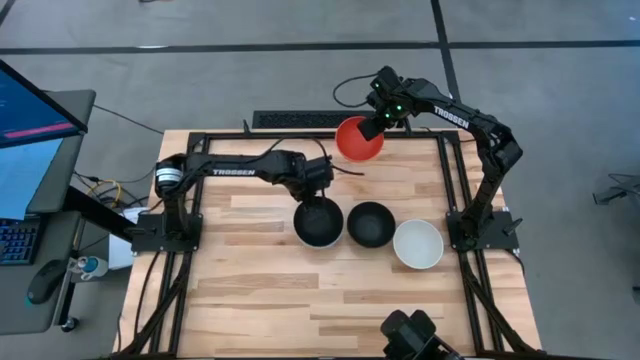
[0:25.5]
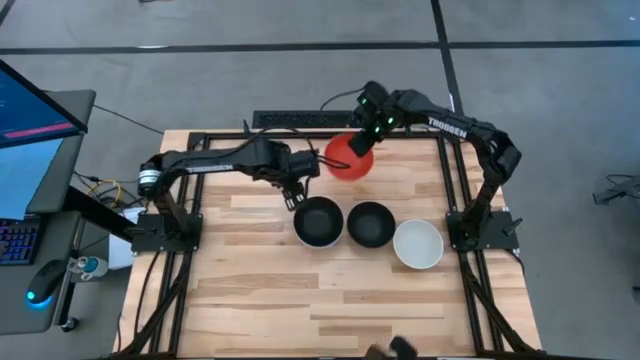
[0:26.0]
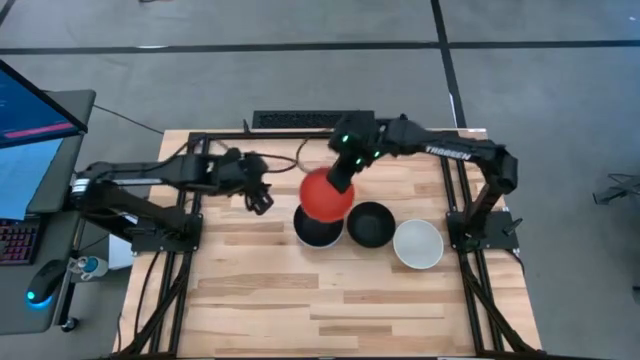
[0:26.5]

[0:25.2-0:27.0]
Task: Nest bowls inside each other
Stack the orange bowl on top of the black stacked bowl

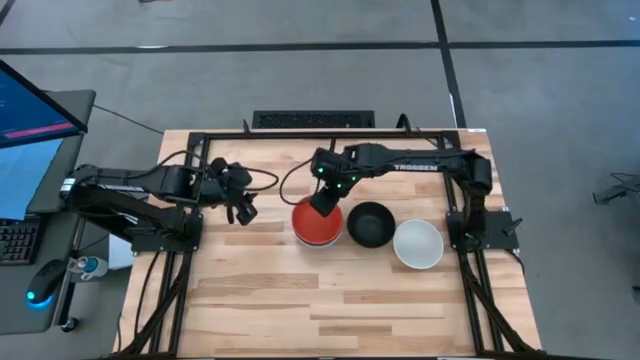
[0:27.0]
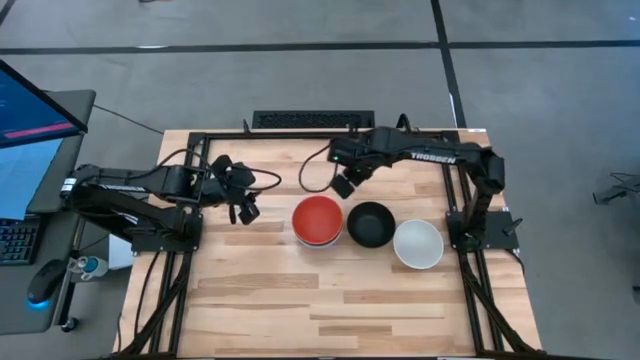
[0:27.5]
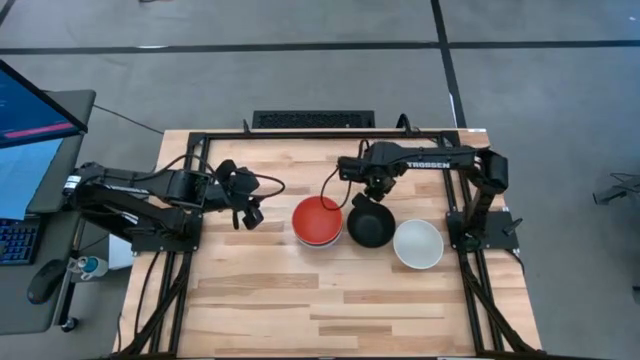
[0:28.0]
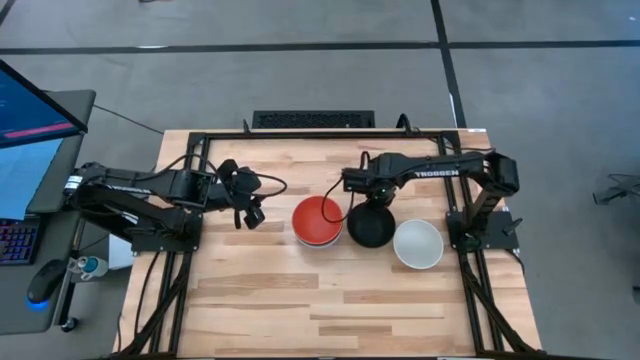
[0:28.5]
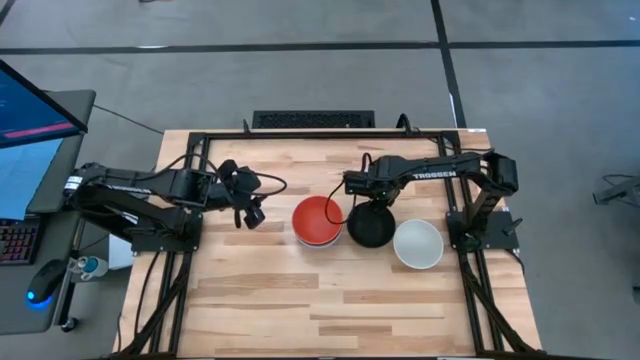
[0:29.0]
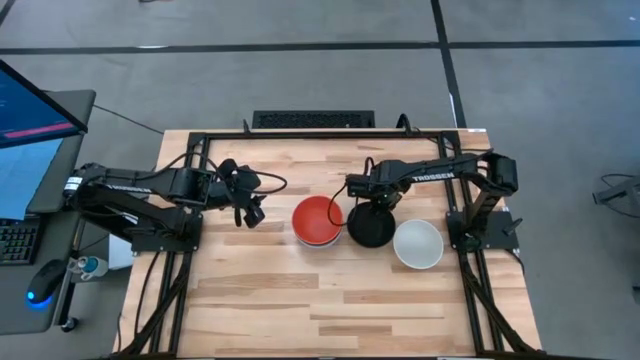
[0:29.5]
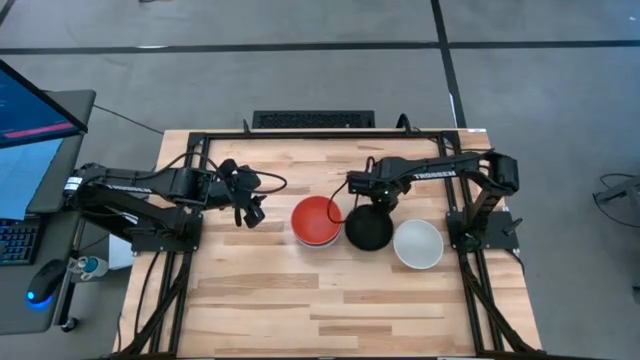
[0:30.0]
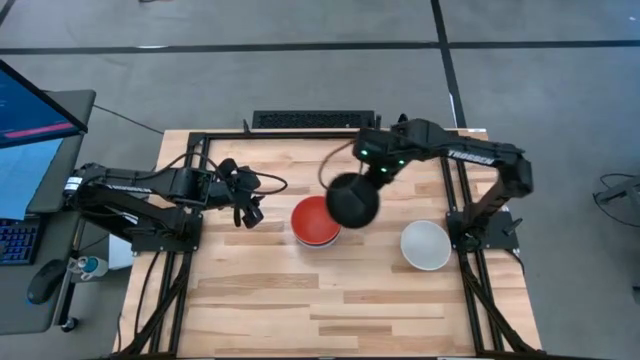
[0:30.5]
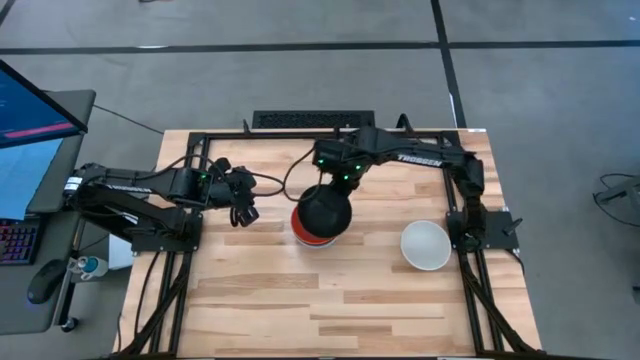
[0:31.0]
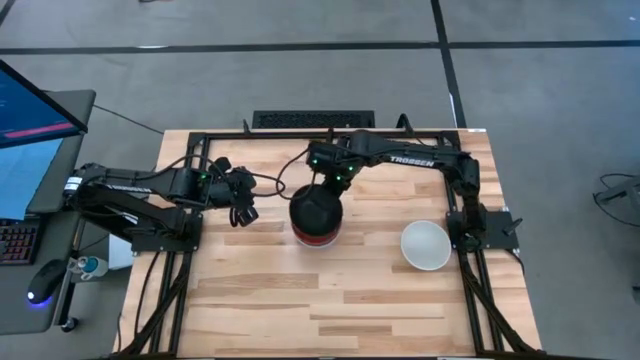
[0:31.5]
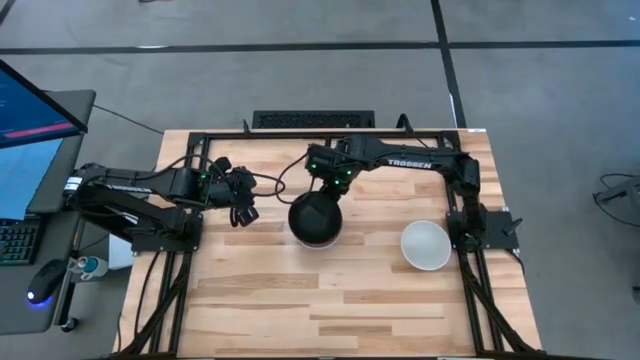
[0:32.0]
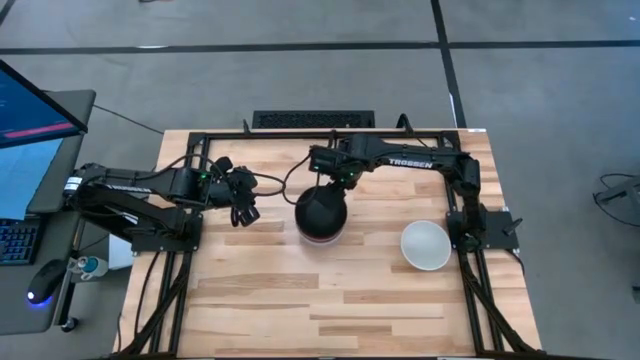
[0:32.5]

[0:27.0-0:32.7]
Stack the black bowl on top of the orange stacked bowl

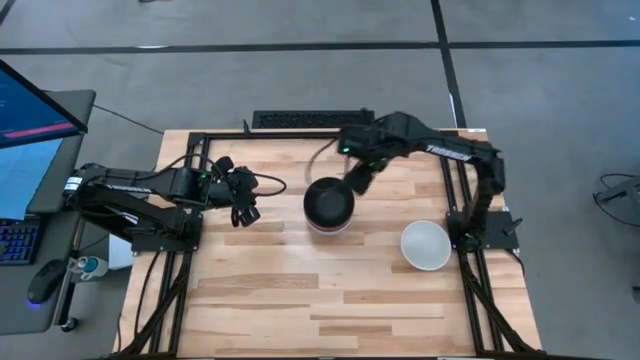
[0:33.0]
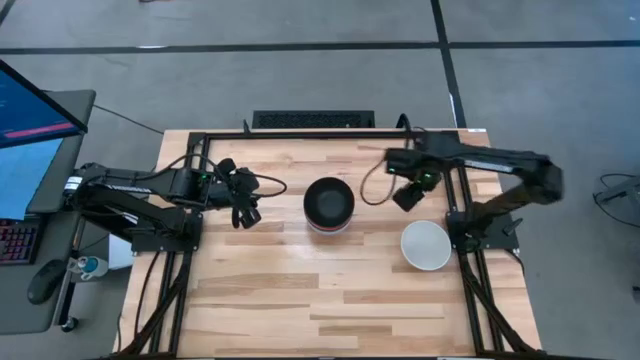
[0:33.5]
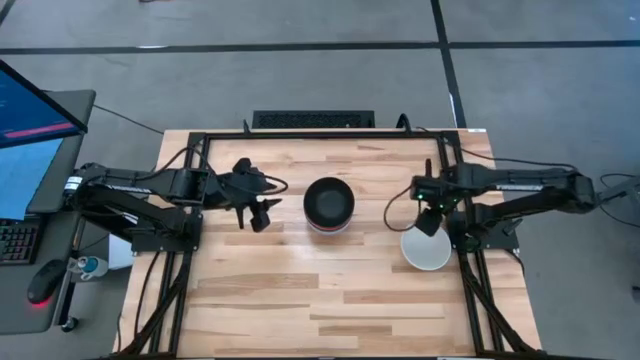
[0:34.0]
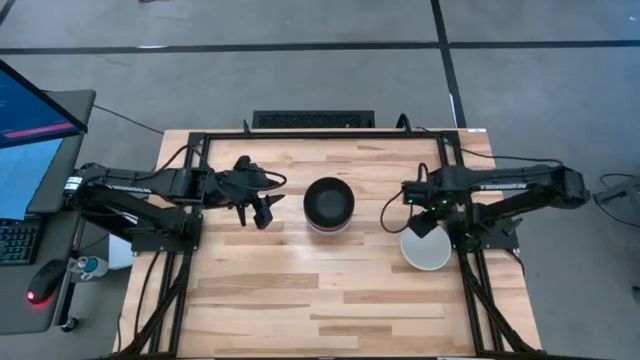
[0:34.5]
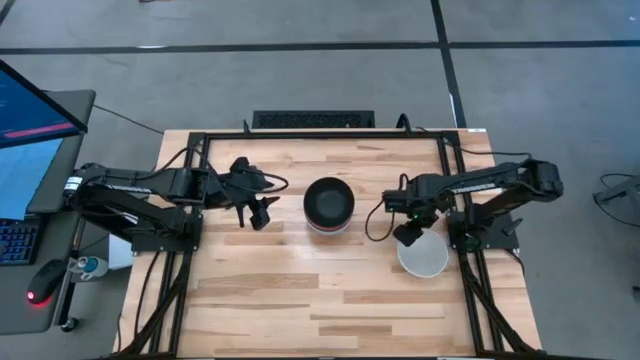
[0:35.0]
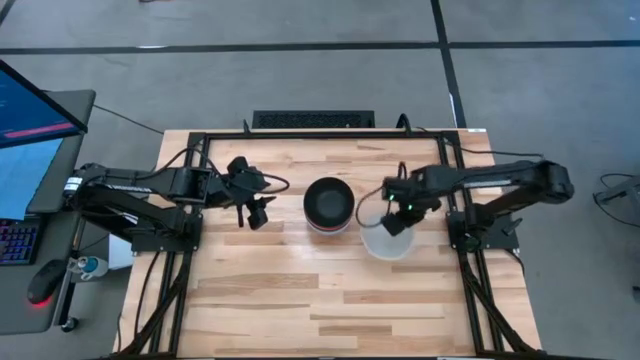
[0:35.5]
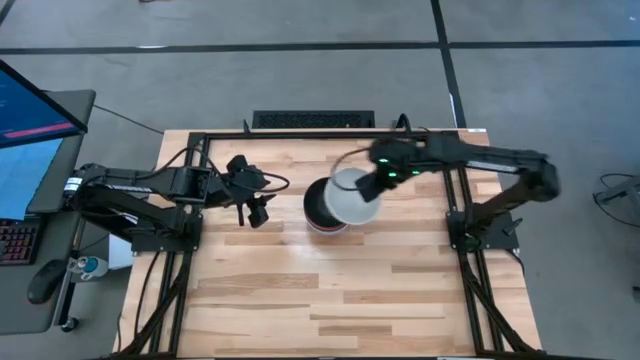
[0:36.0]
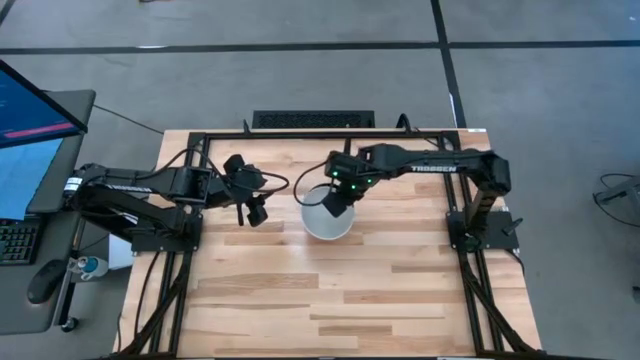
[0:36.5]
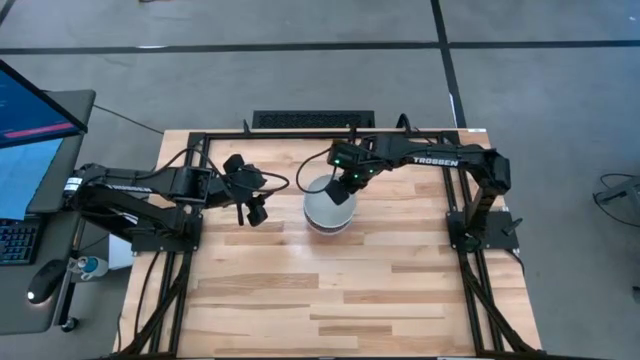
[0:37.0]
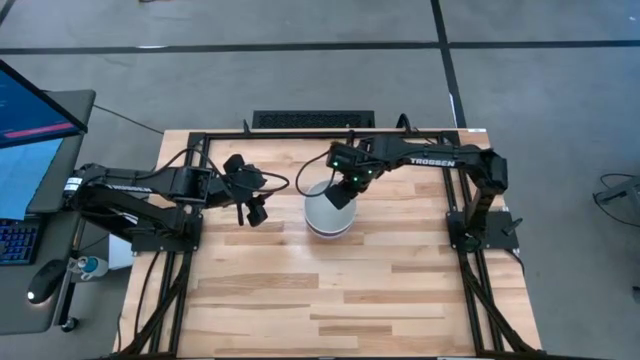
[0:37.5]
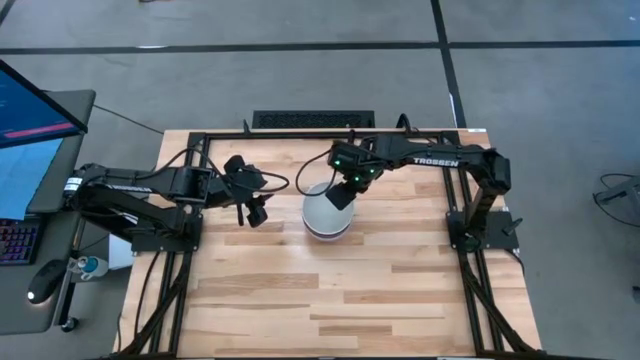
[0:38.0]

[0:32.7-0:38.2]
Stack the white bowl on top of the black stacked bowl

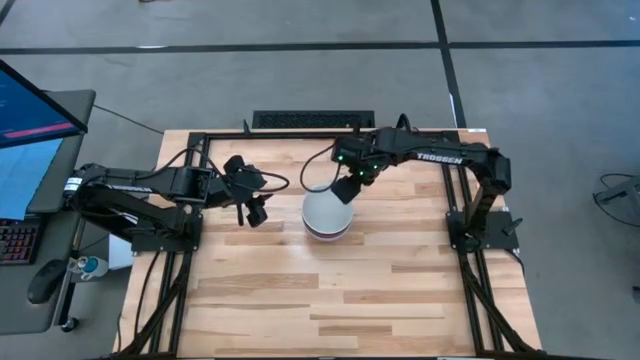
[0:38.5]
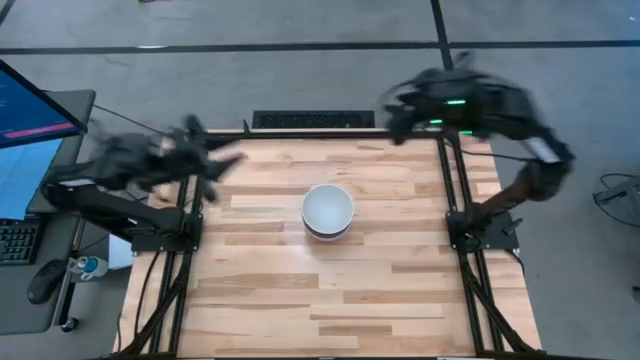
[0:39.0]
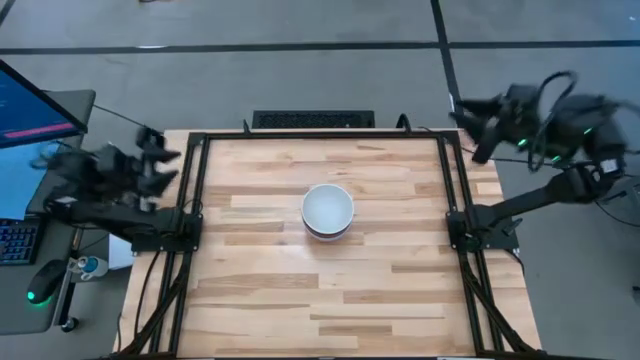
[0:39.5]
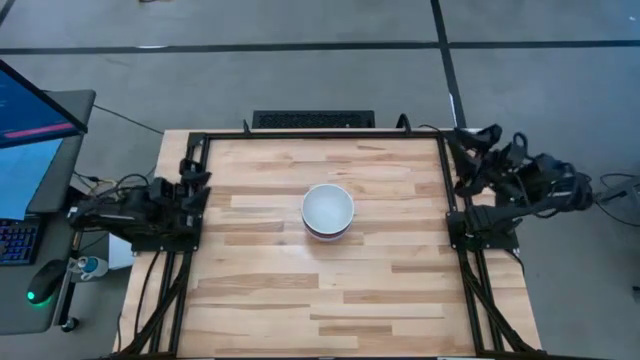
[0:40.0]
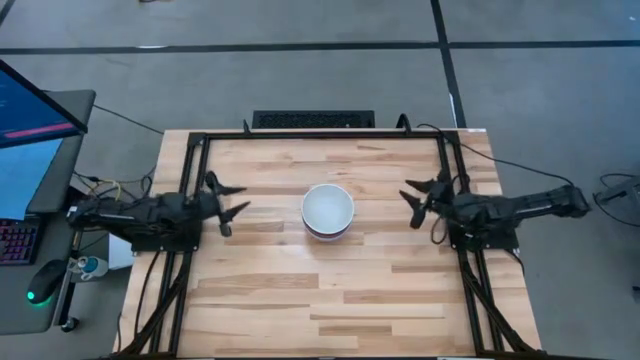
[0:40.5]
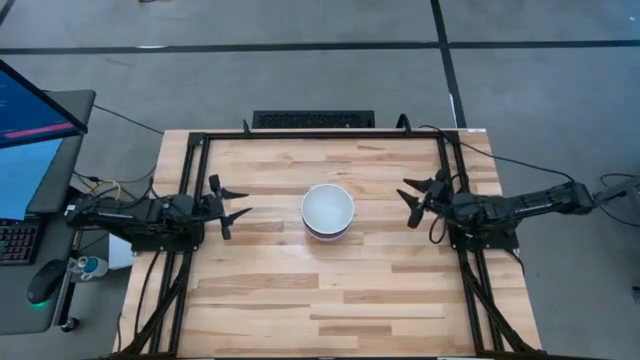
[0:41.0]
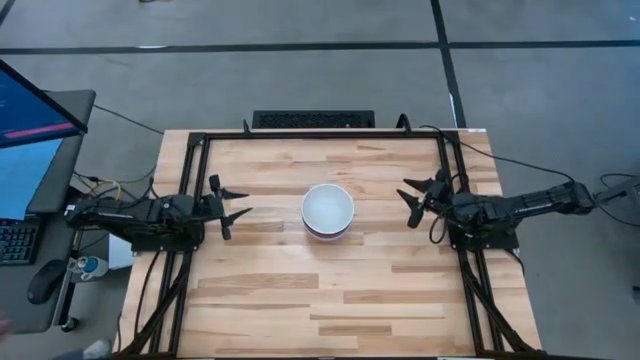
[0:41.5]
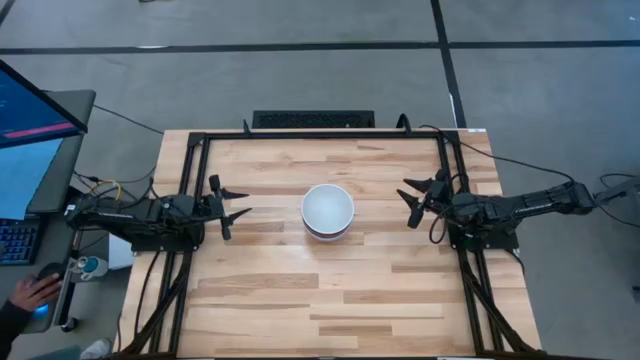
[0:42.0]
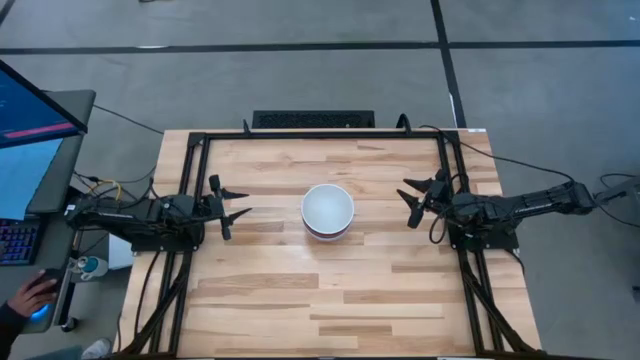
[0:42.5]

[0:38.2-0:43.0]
Return to Home Position

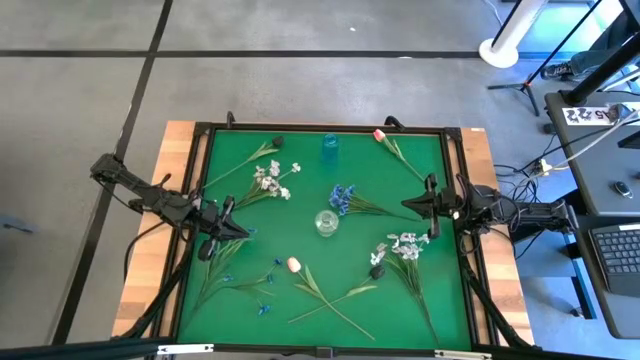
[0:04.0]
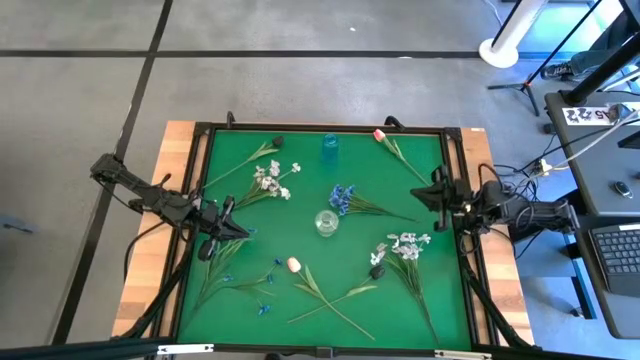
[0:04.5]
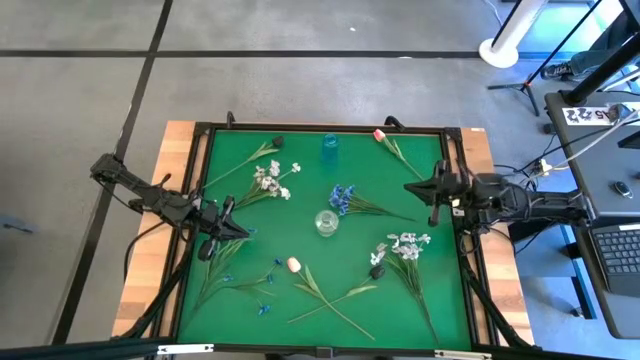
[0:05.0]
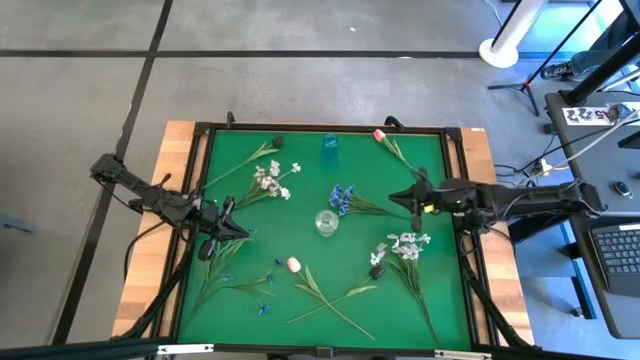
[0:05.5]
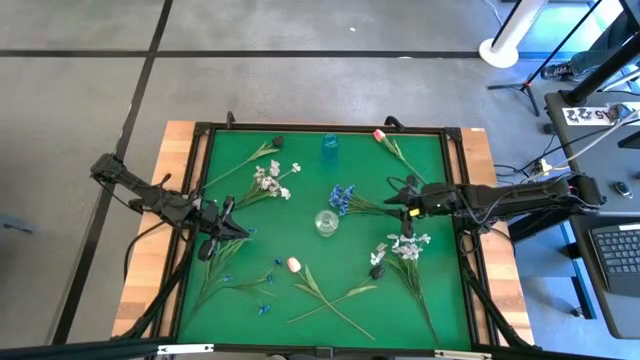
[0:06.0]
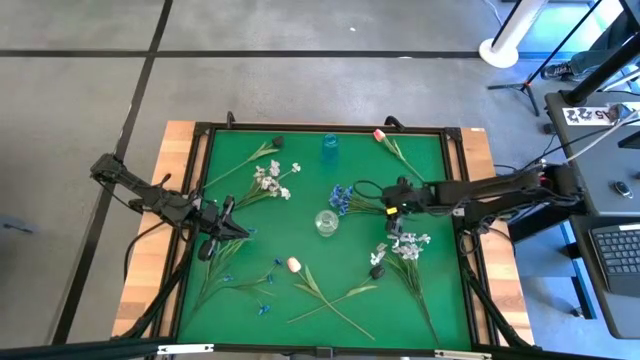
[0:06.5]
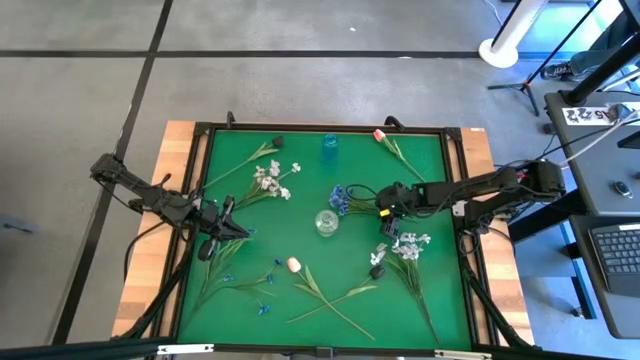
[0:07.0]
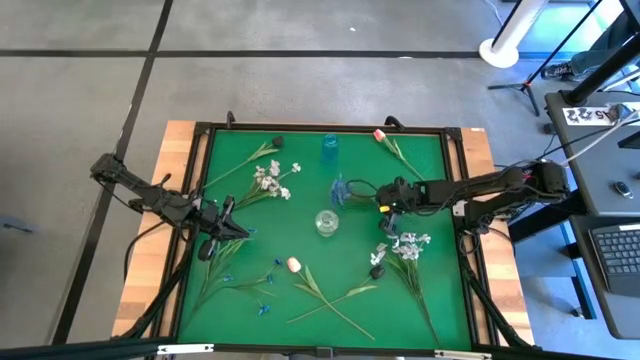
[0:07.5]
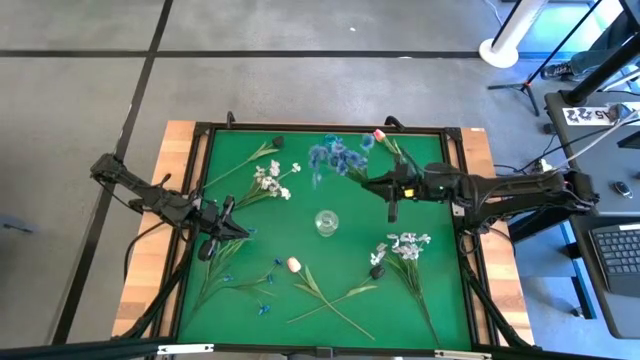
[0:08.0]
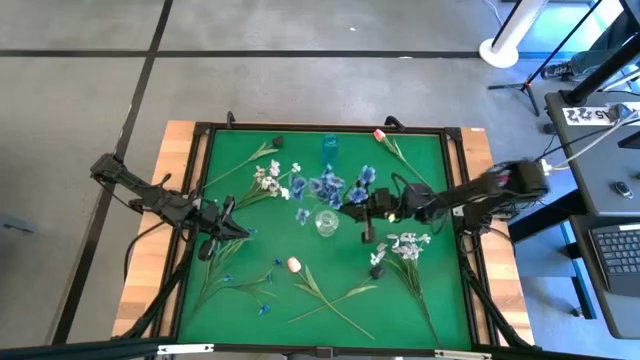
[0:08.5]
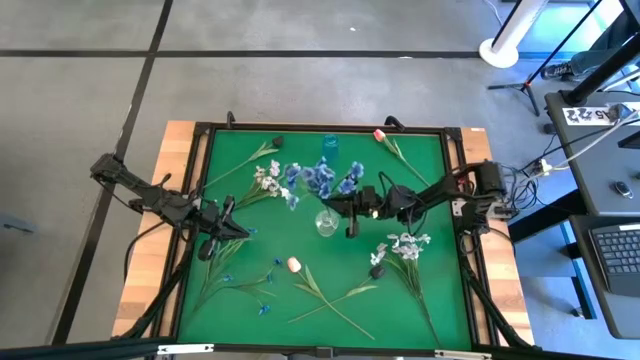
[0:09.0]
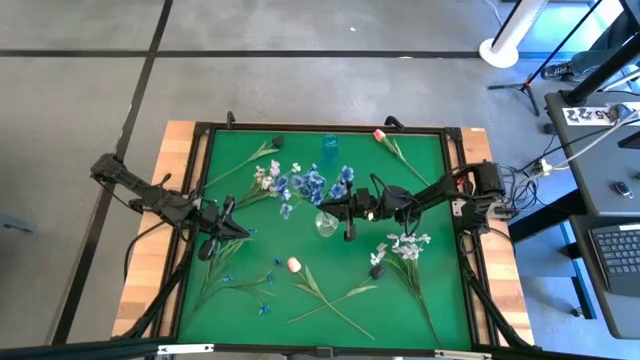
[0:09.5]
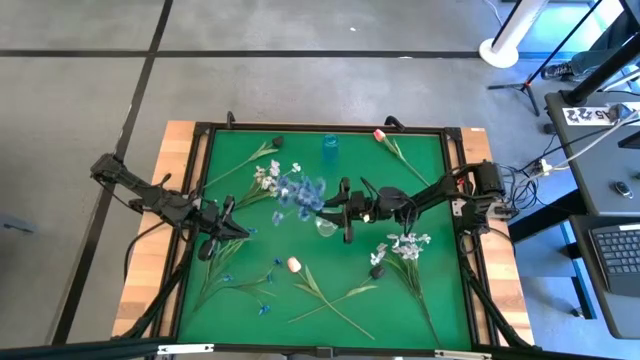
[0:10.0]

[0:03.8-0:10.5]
Task: Sort flowers into vase by color
Put the blue flowers into the transparent vase
